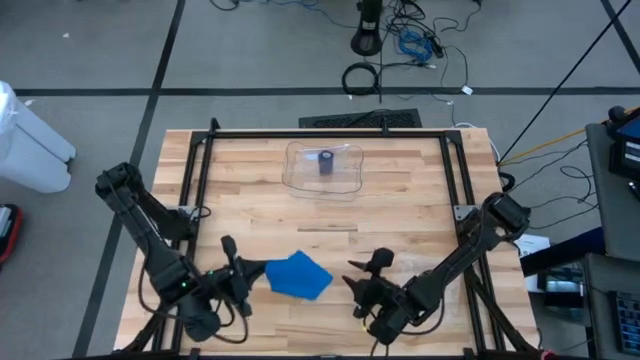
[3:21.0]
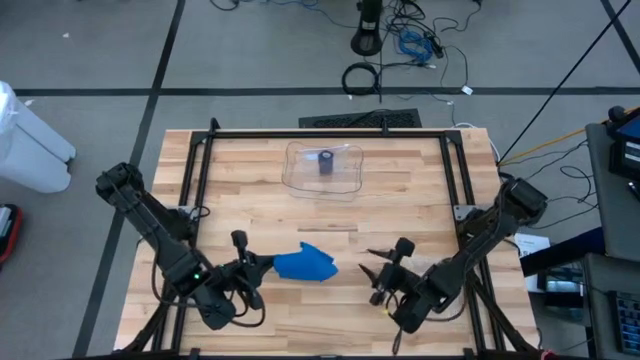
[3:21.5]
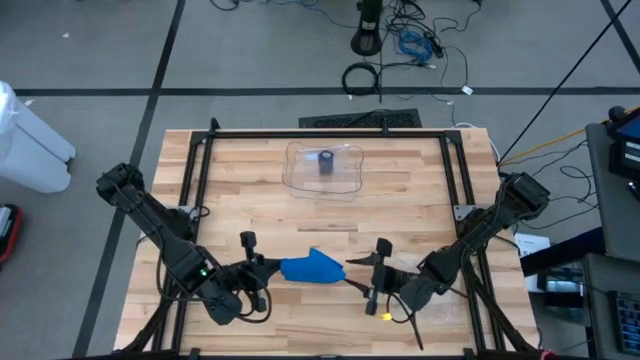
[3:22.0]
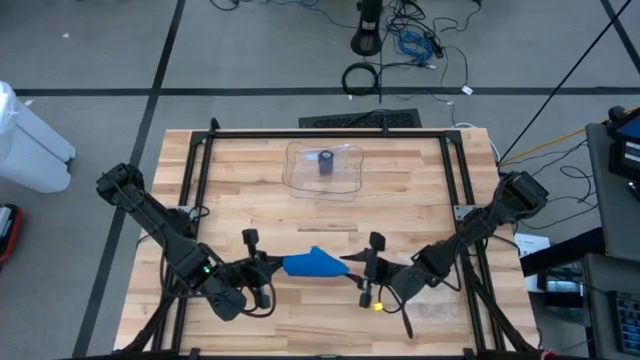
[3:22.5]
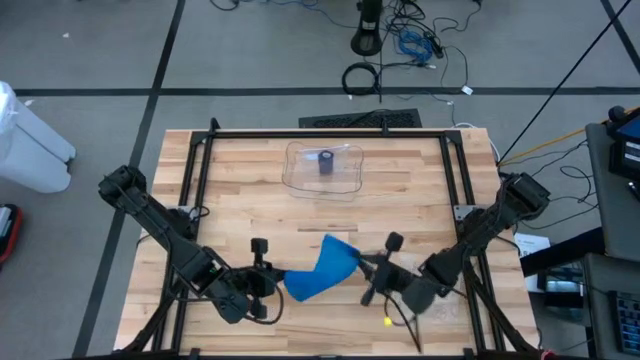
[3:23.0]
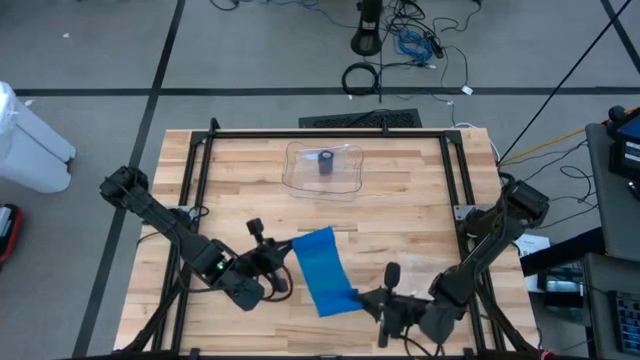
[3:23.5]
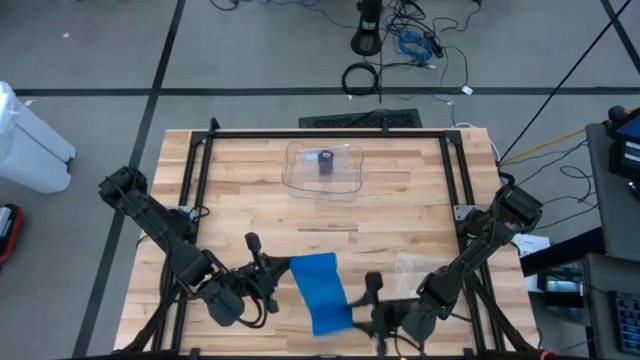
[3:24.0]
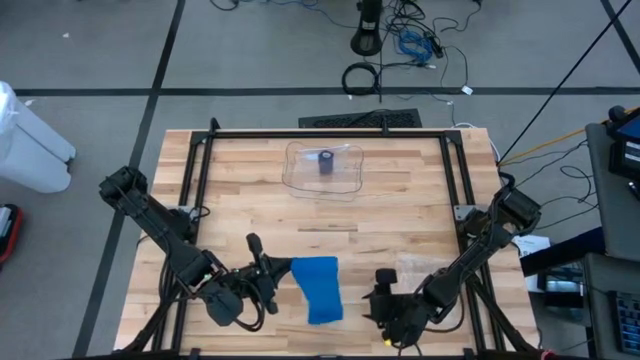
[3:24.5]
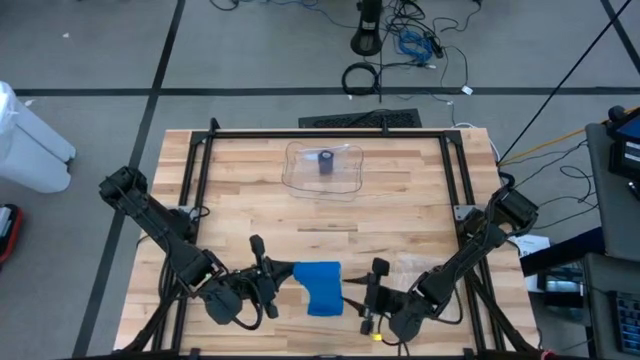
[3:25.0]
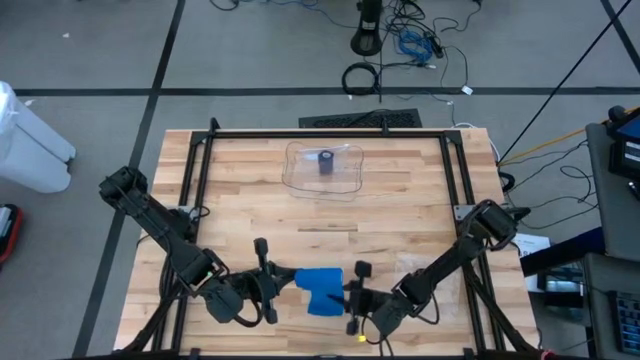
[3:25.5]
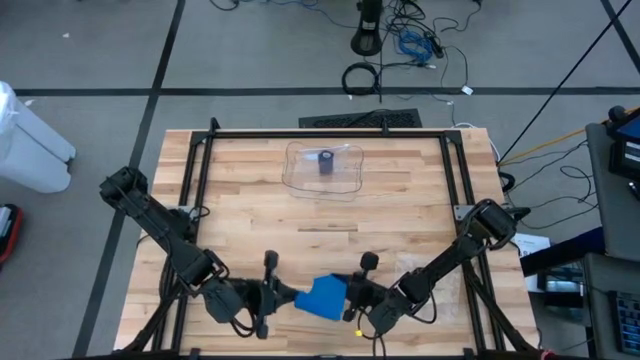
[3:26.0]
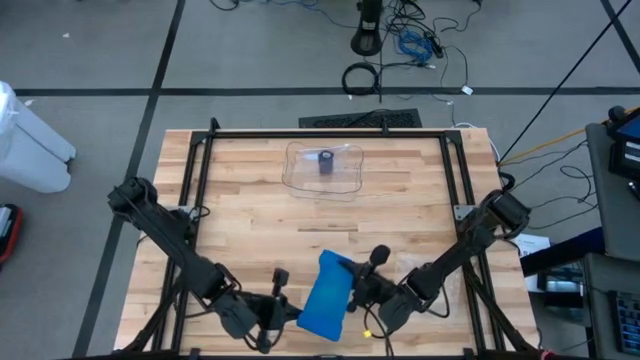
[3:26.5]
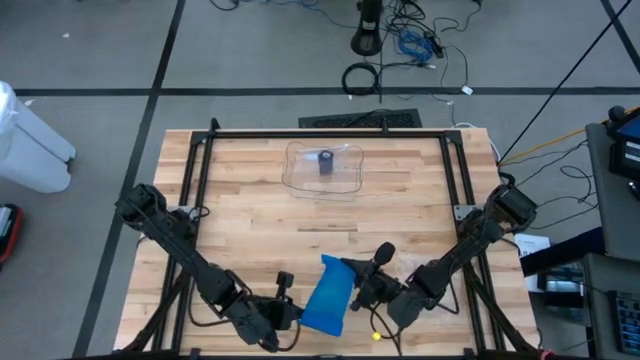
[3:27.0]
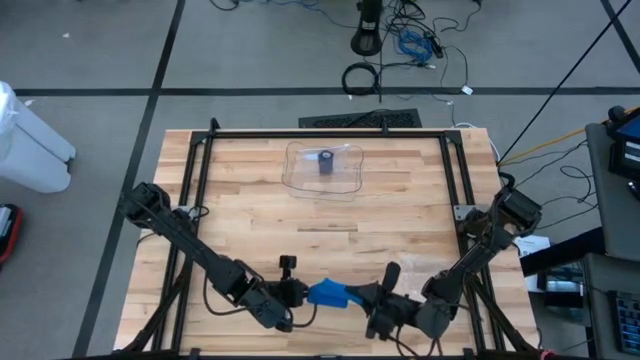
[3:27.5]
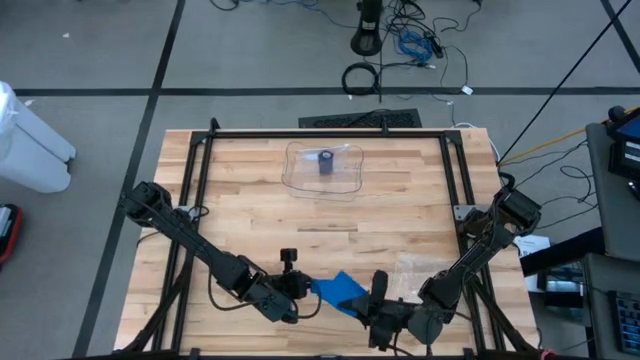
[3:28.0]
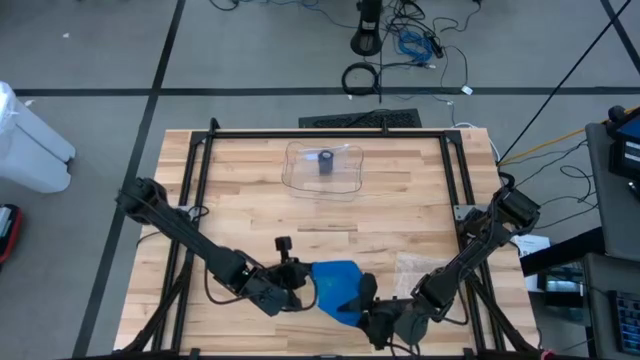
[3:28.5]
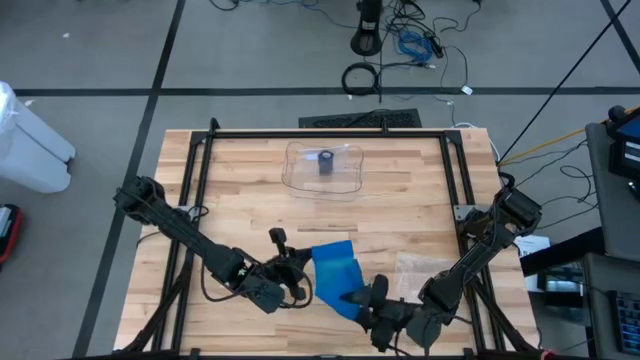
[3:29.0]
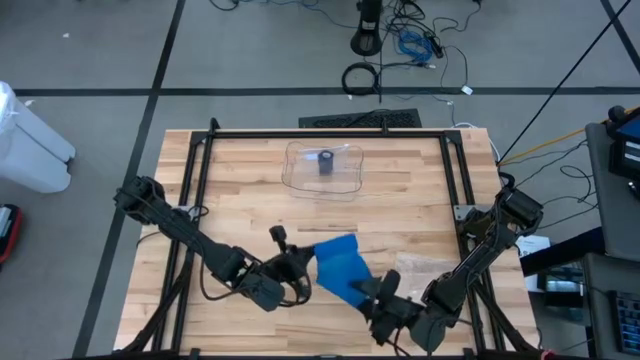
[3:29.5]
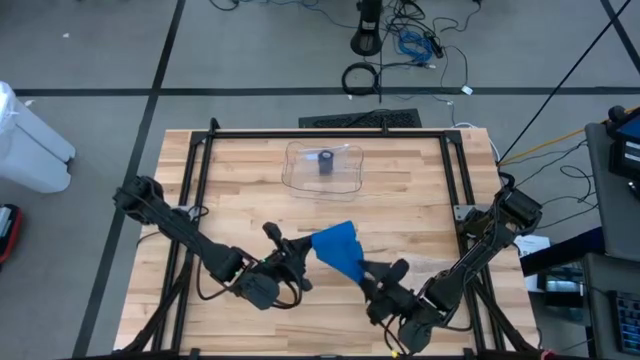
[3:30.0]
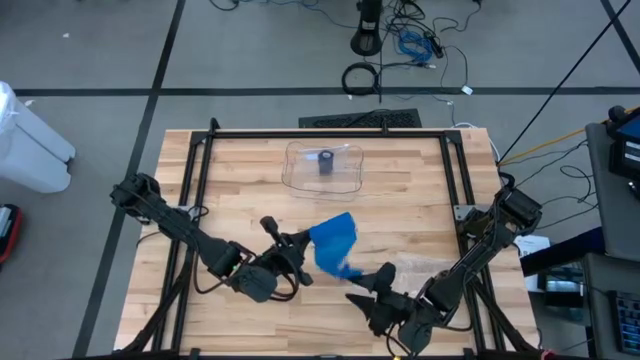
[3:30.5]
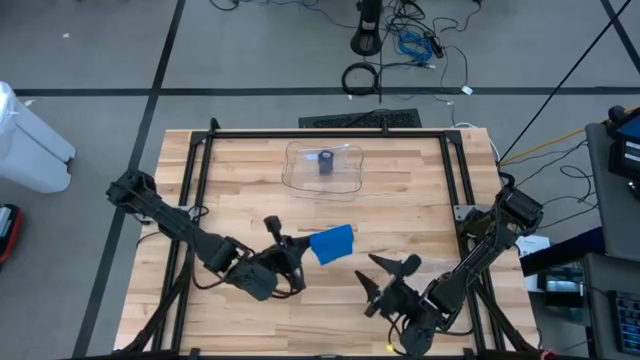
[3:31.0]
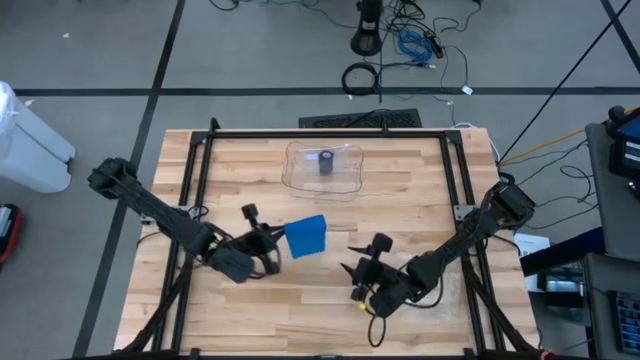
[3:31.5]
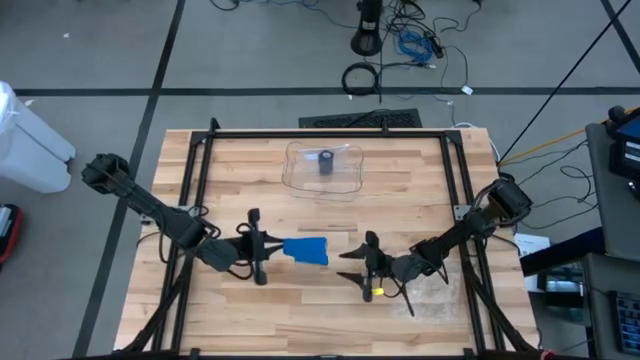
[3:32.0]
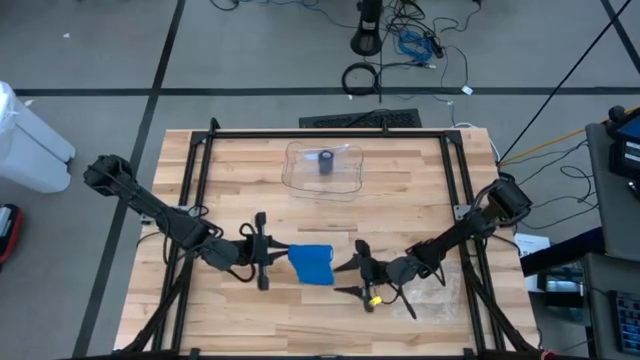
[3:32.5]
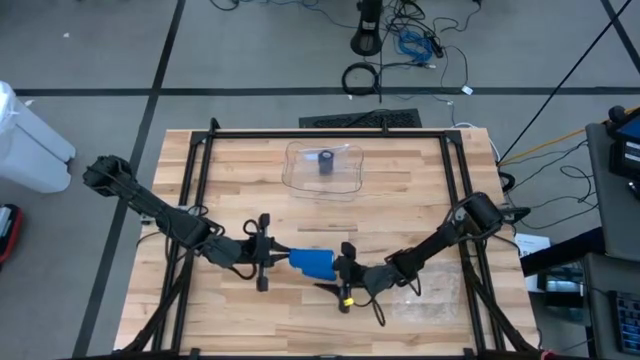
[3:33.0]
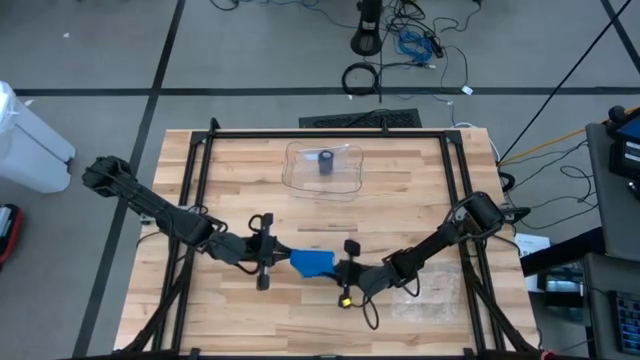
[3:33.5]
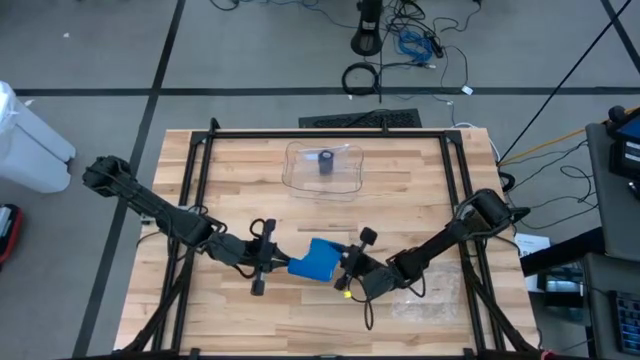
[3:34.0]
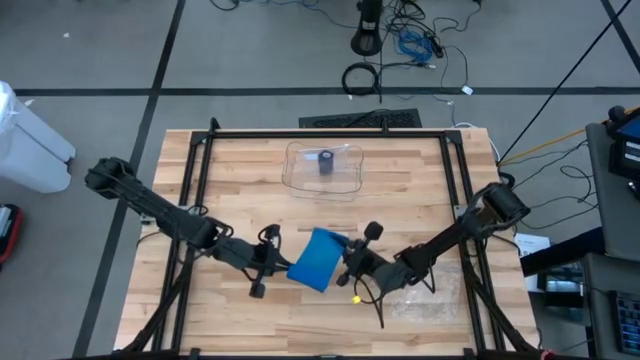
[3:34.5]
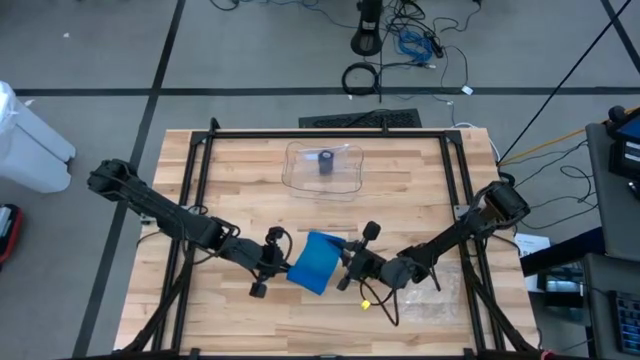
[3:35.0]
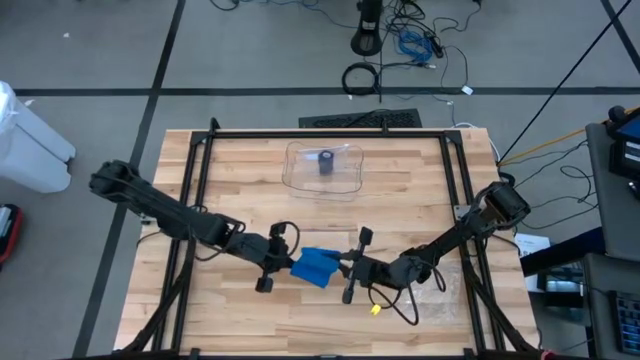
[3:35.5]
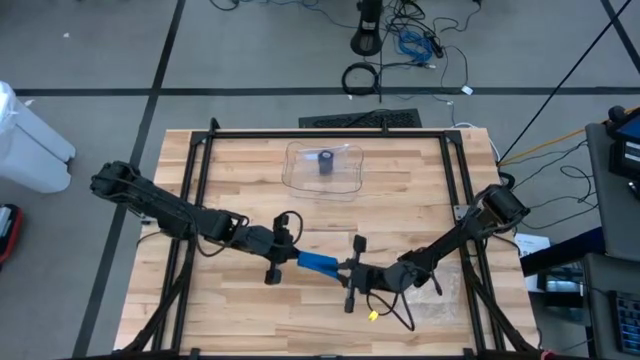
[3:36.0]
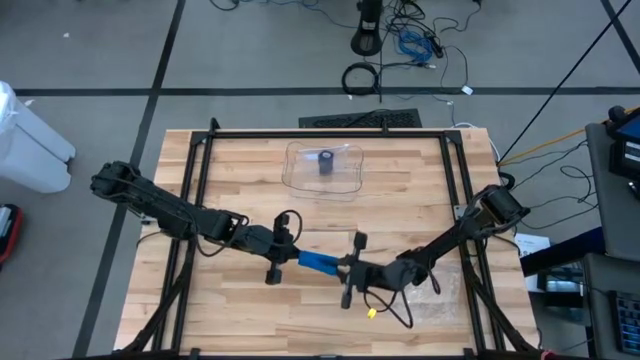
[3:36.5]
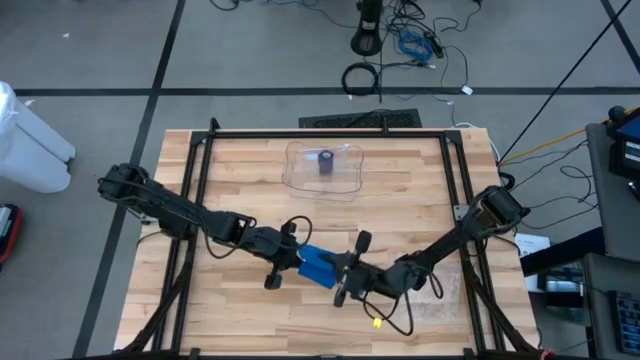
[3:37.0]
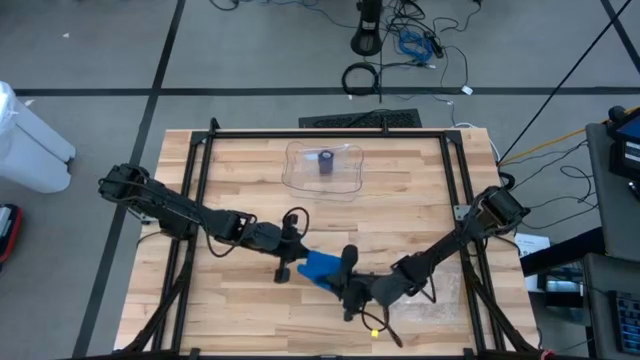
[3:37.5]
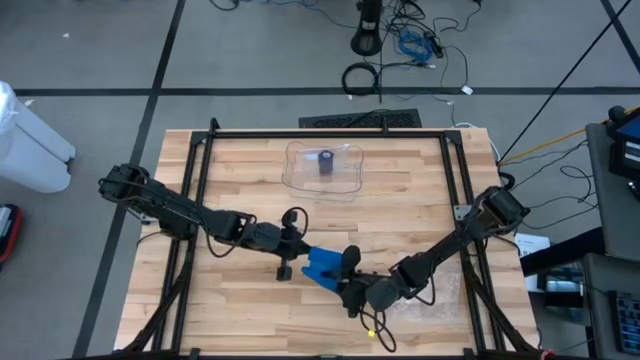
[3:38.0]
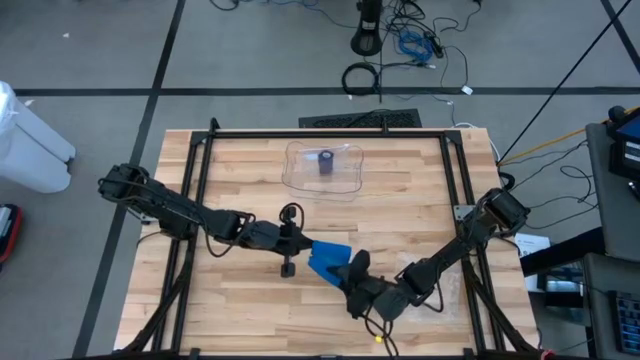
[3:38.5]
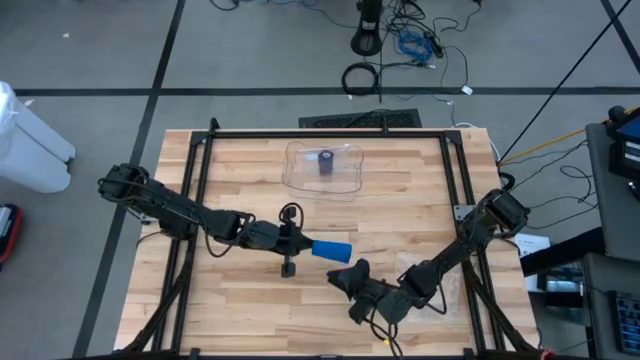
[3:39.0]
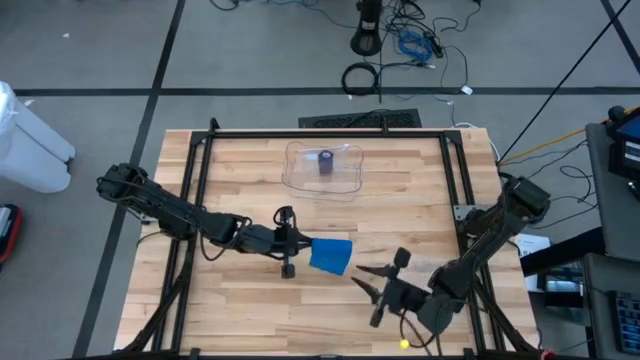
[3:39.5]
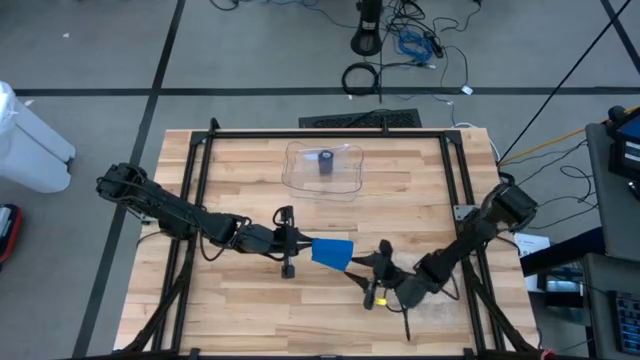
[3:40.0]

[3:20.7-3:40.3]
Task: Roll bandage
Roll the blue bandage

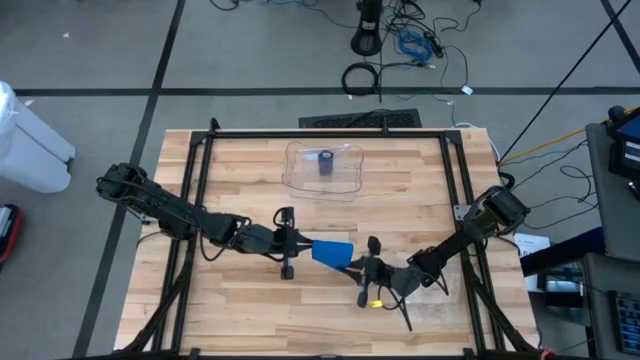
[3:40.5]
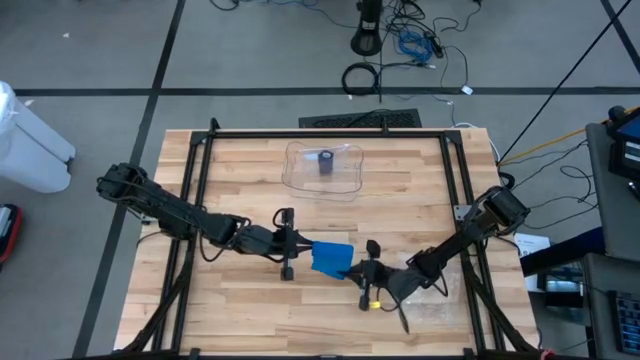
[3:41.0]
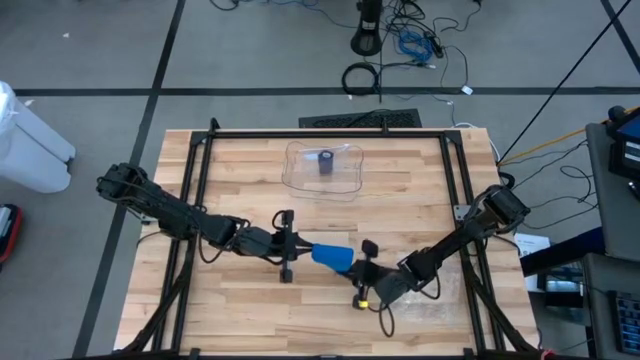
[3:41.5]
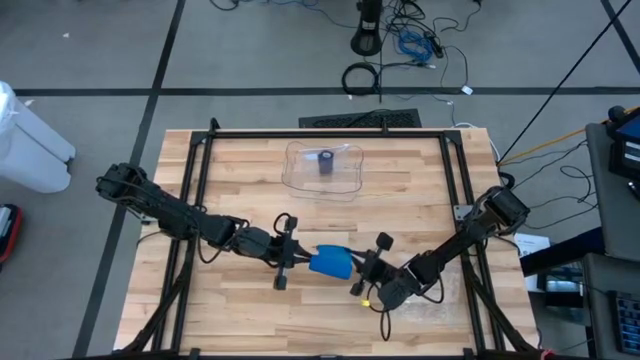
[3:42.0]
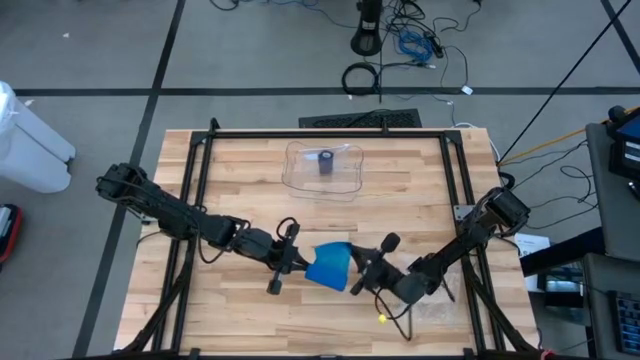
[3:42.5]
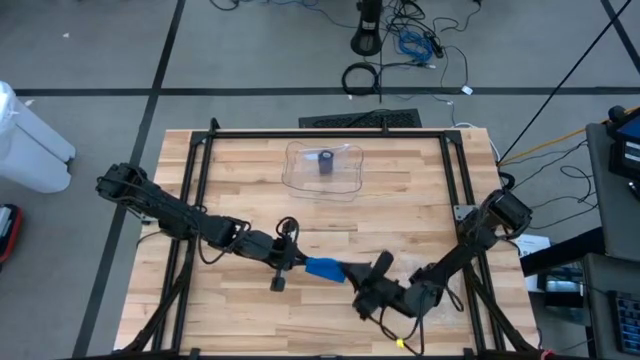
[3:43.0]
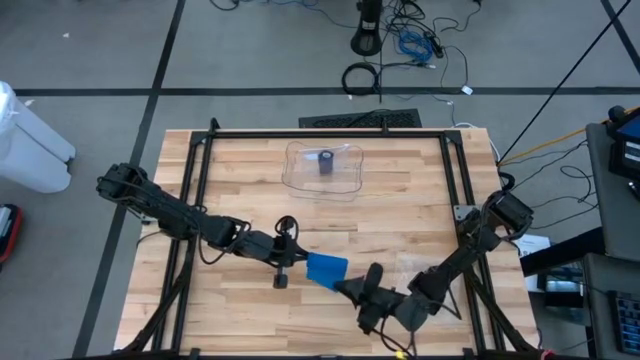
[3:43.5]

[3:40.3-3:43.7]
Roll the blue bandage
